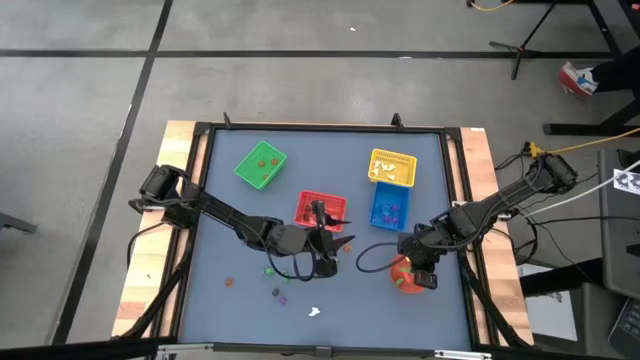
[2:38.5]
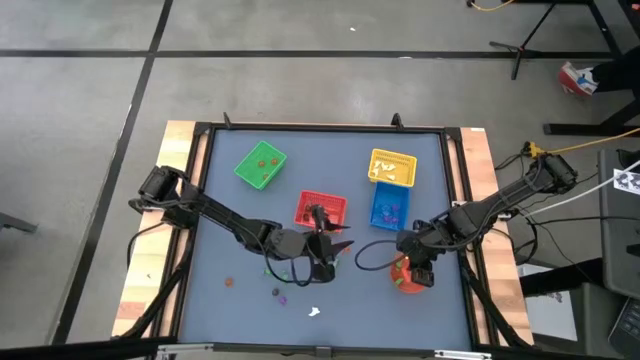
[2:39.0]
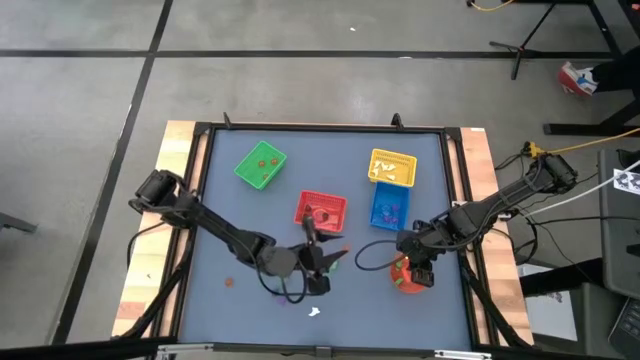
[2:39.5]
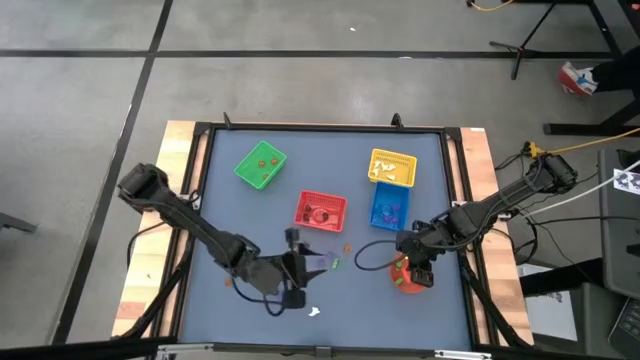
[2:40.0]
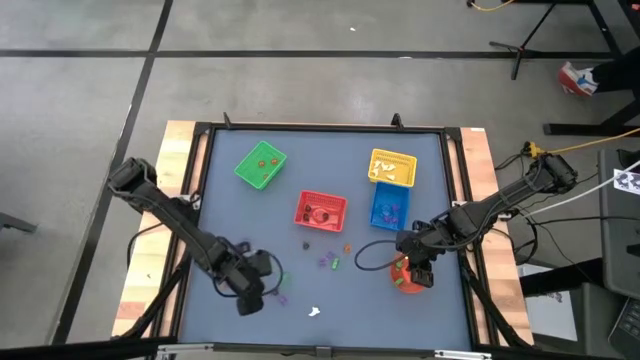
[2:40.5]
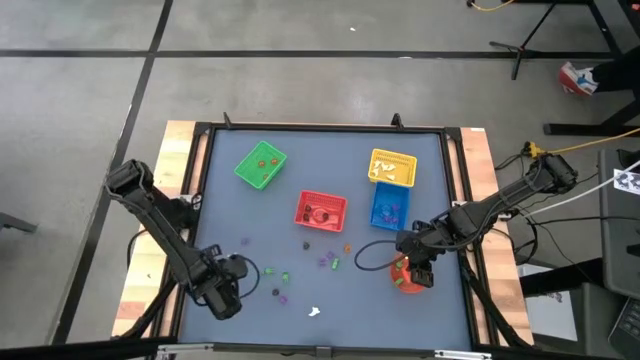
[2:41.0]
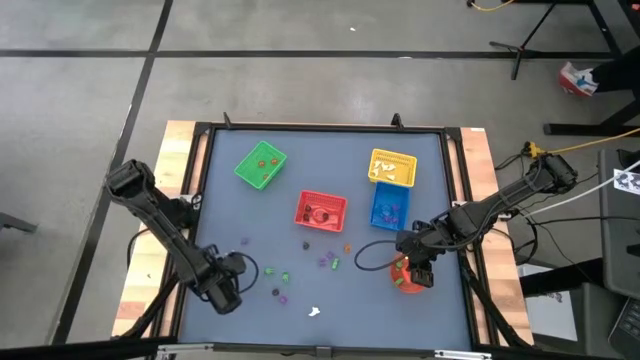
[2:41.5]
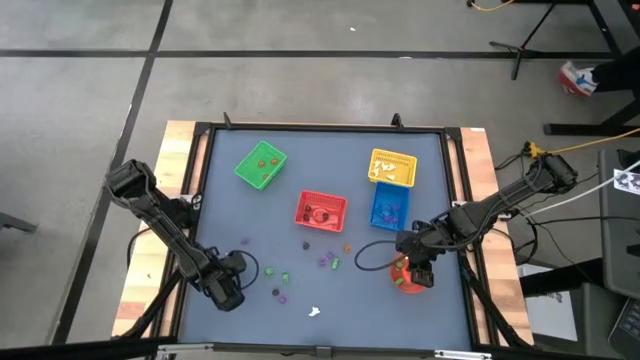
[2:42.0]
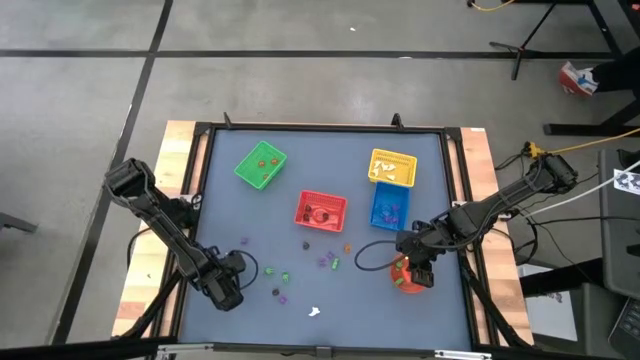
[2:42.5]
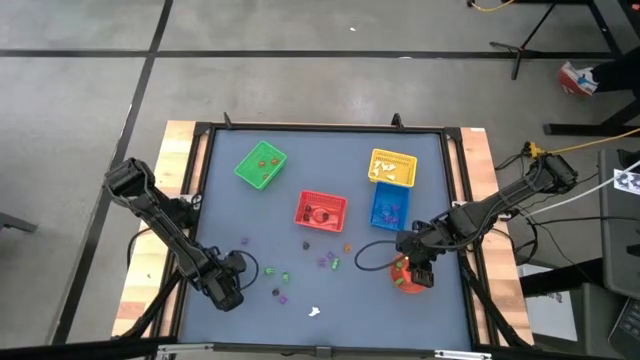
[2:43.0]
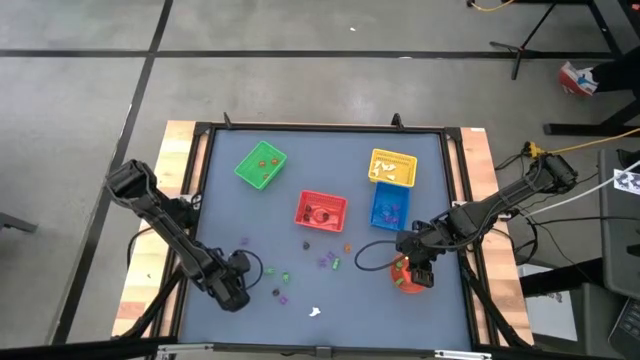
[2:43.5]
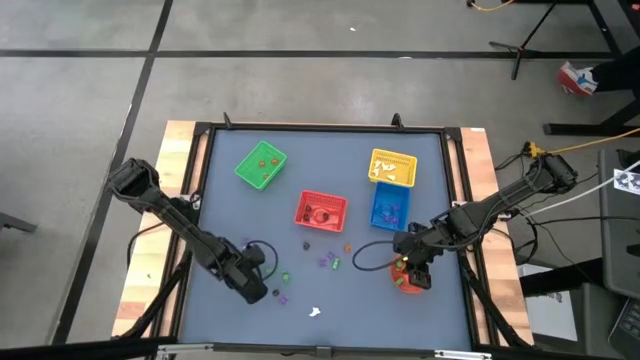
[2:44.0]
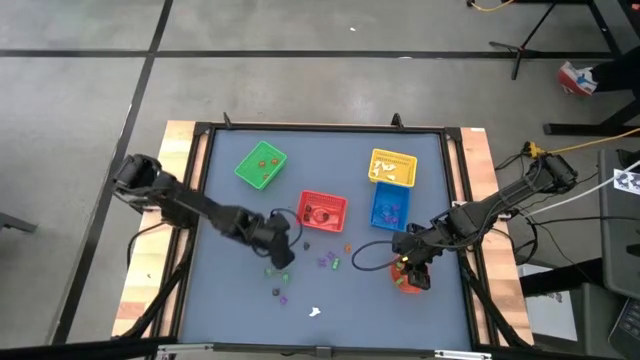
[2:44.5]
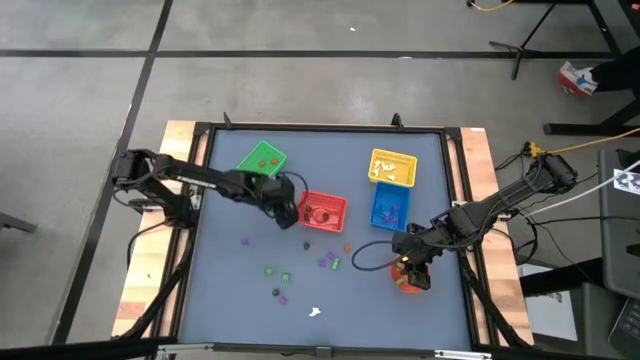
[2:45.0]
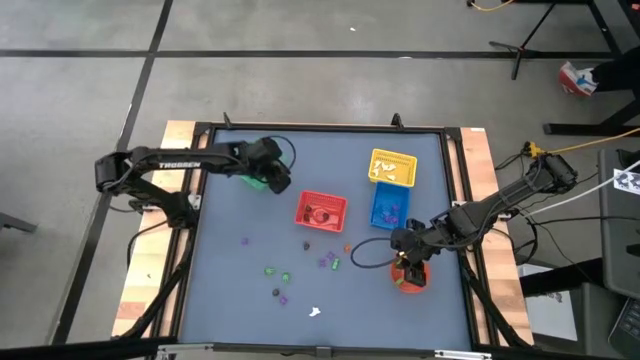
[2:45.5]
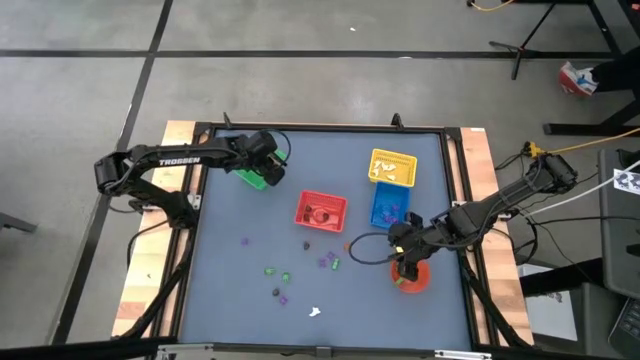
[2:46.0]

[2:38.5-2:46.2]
Task: Sort Halloween decoration
Put the orange pumpkin toy into the green bin

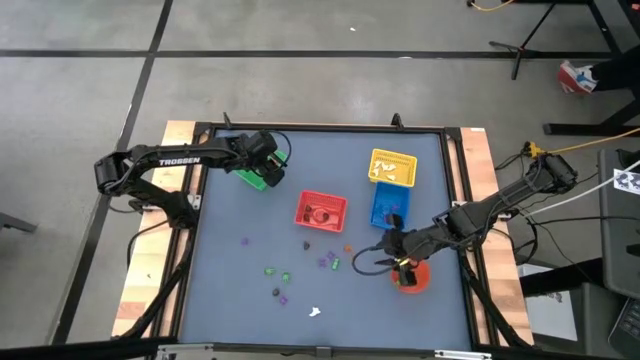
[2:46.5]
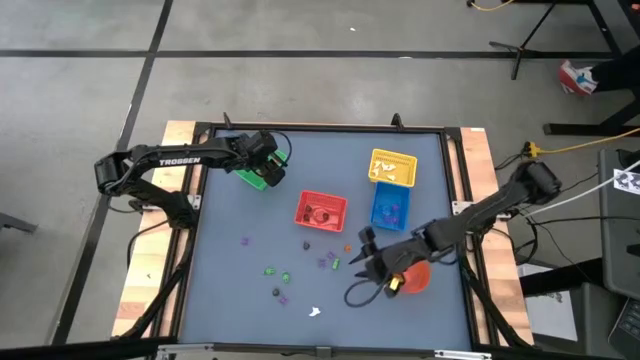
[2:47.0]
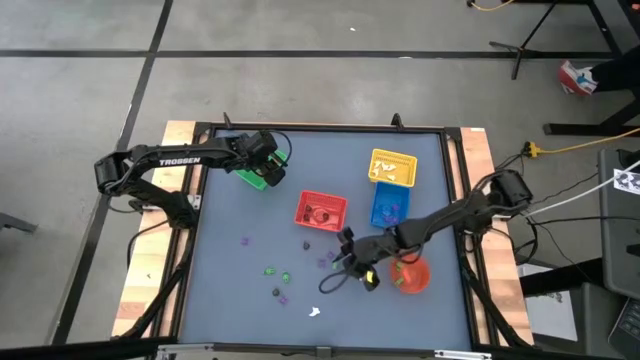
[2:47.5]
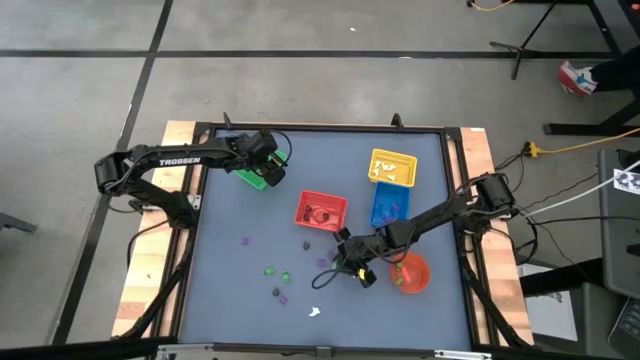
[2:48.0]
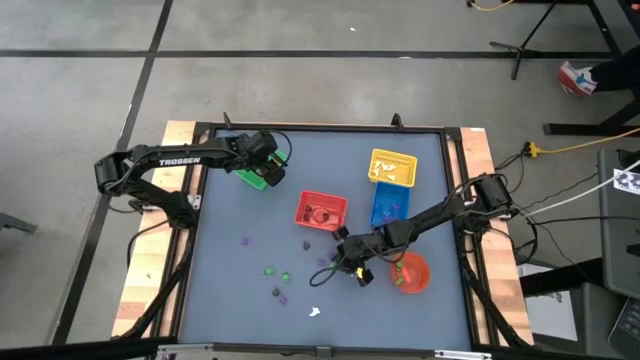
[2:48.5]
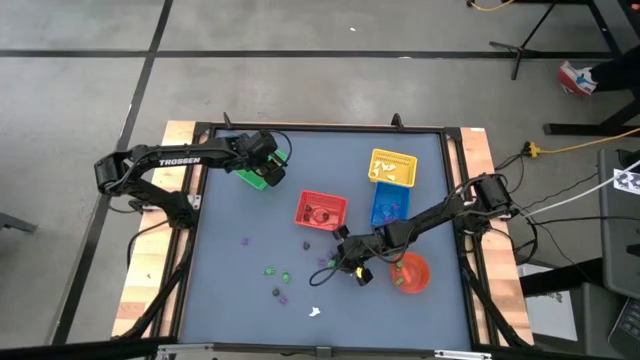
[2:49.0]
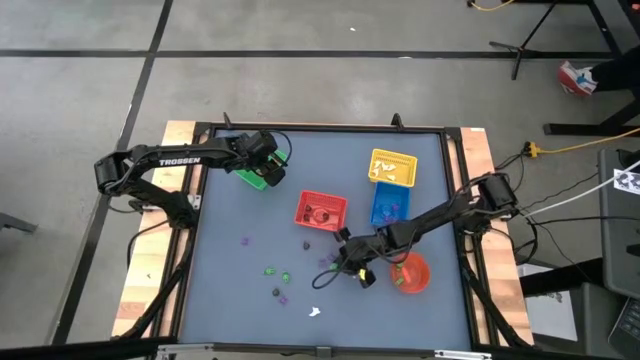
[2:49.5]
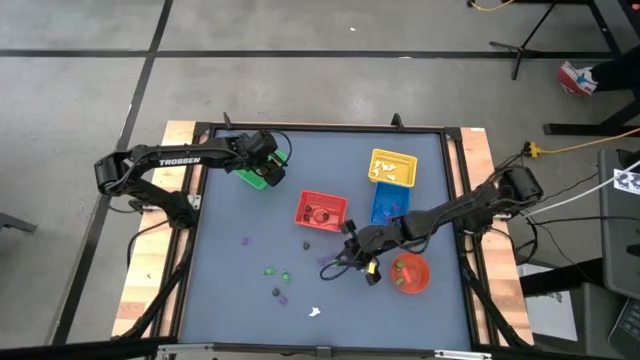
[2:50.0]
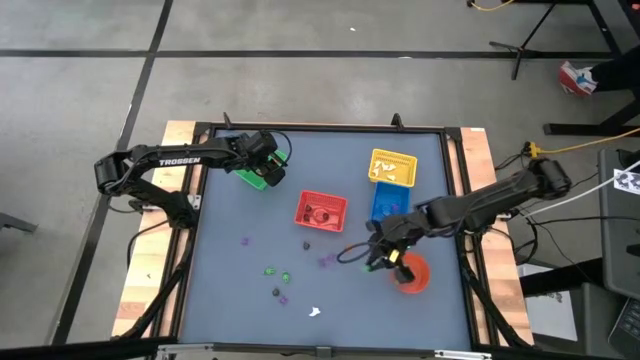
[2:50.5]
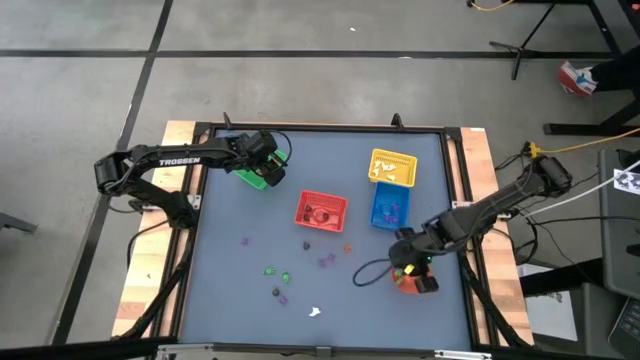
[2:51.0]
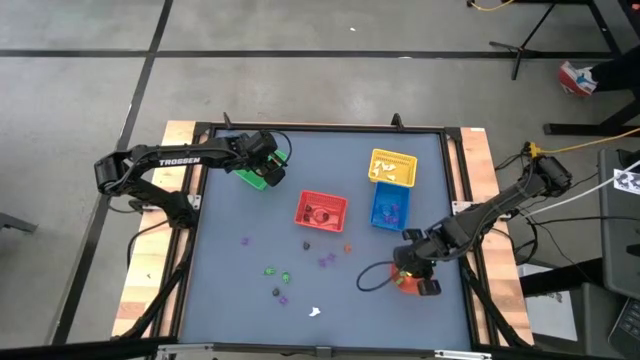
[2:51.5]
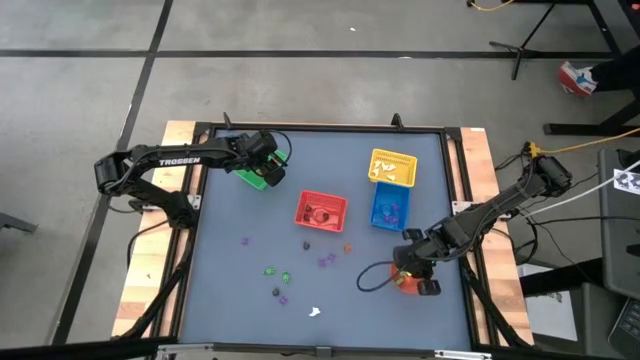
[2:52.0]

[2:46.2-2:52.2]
Put the green skeleton toy into the orange bin

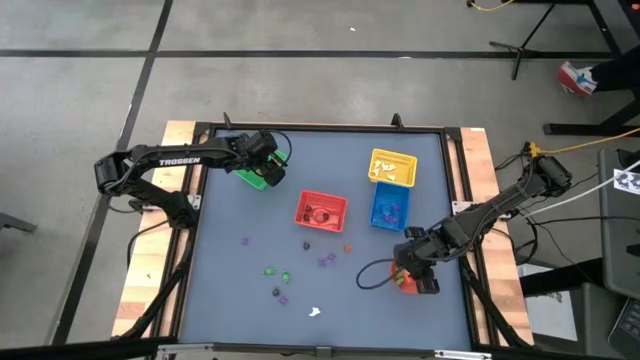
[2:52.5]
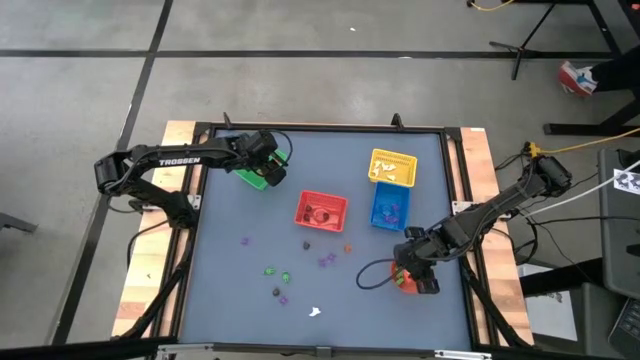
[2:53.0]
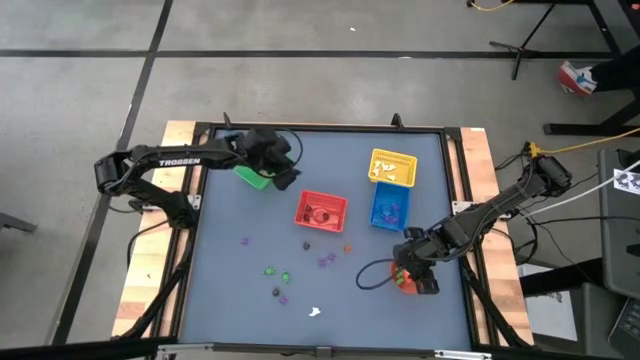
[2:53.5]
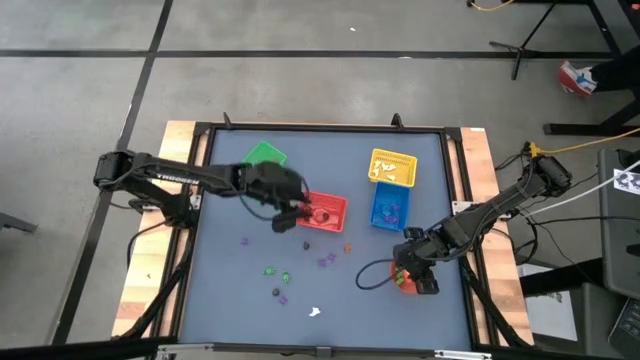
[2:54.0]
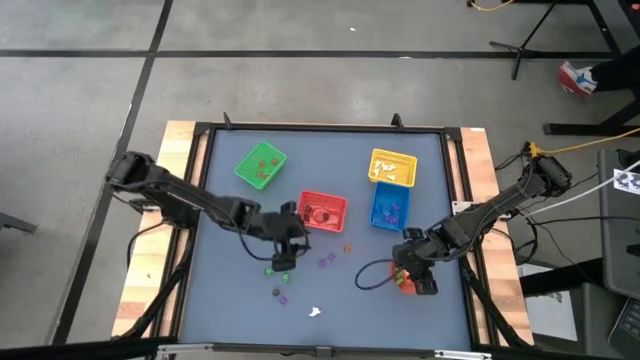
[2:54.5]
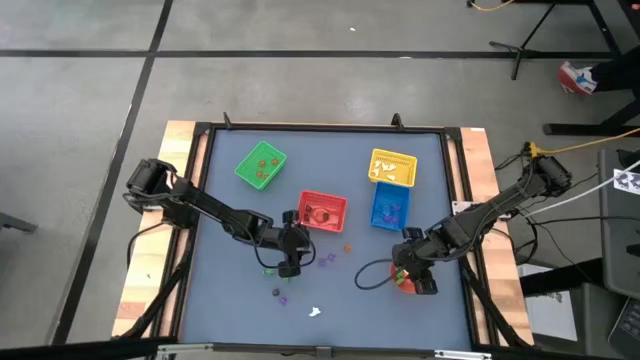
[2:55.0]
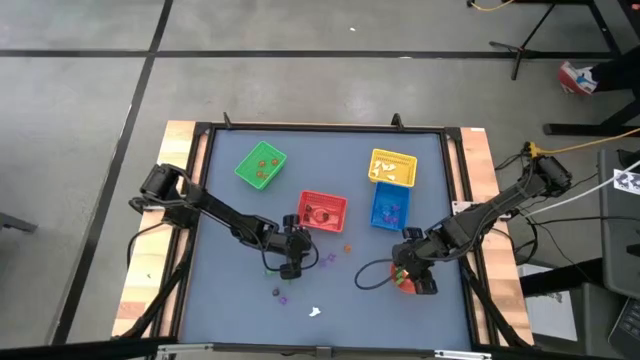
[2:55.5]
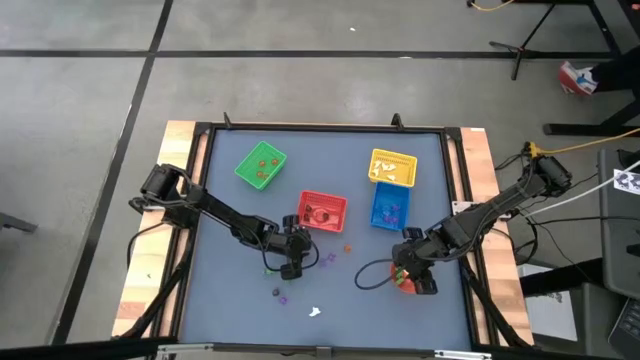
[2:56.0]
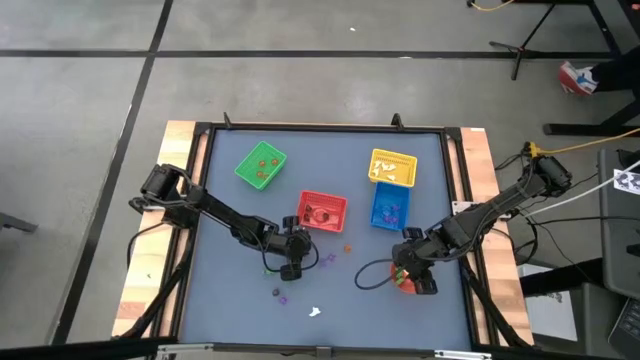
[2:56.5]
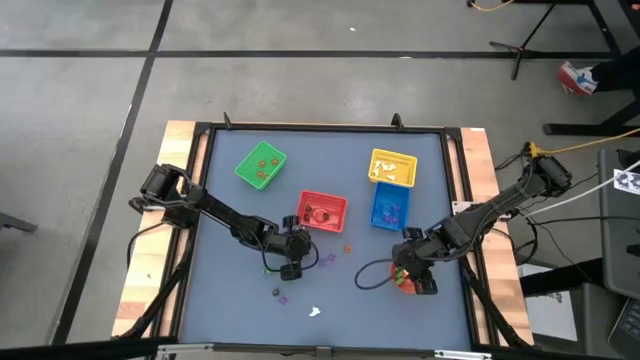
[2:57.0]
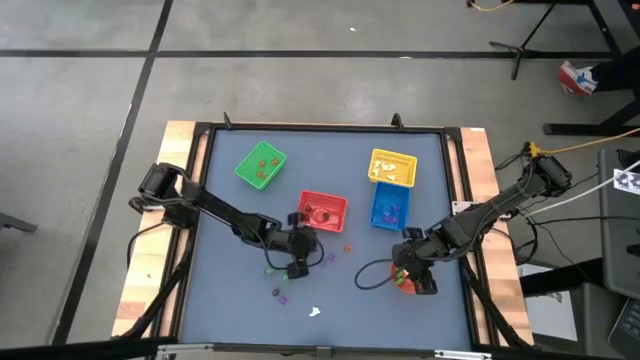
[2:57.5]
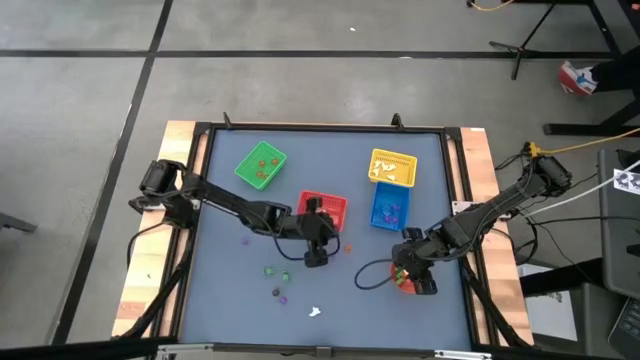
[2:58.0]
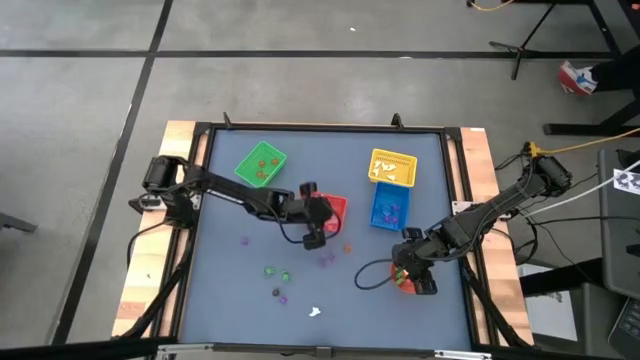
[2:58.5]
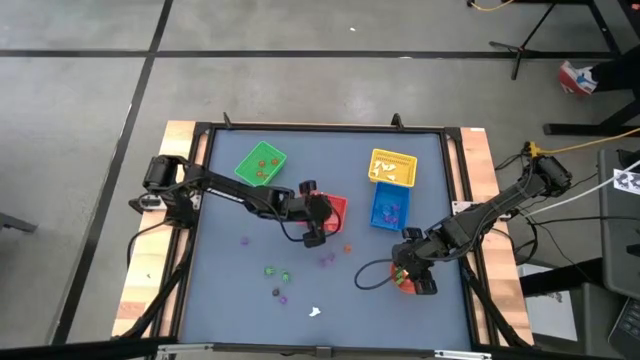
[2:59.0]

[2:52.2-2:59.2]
Put the black skull toy into the red bin

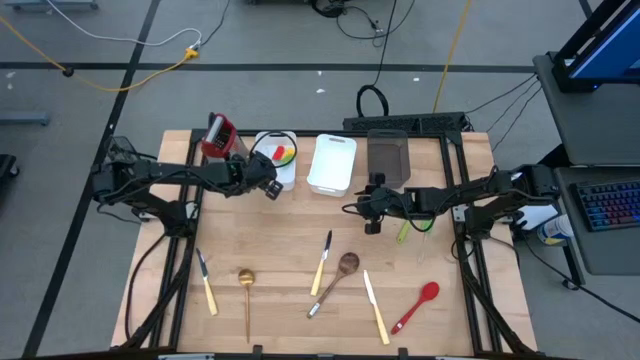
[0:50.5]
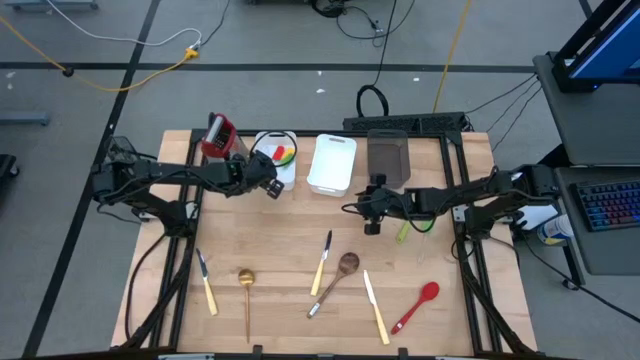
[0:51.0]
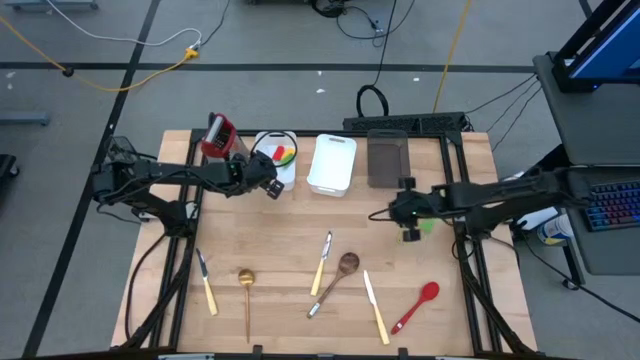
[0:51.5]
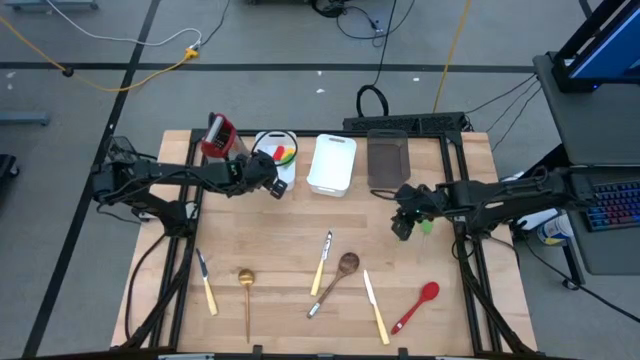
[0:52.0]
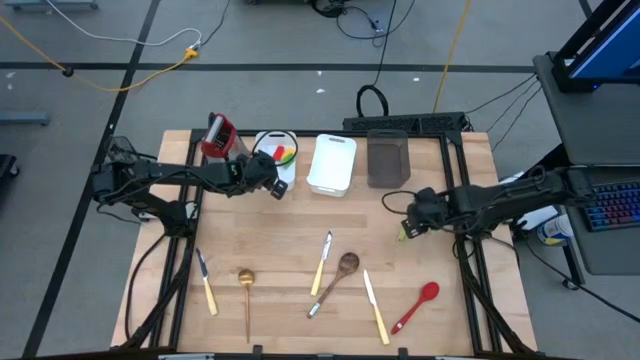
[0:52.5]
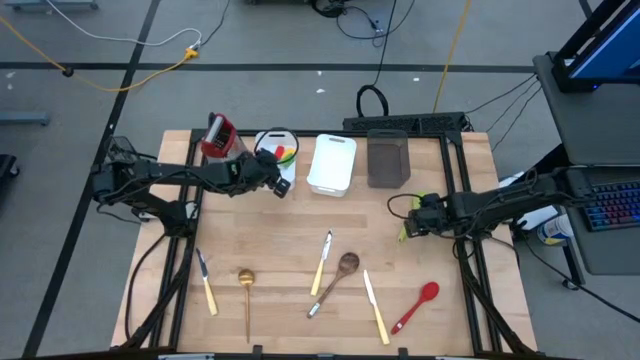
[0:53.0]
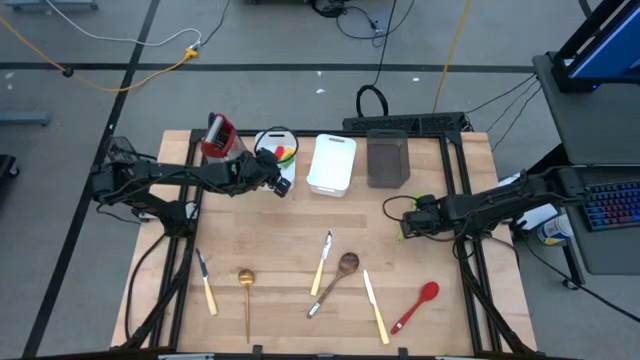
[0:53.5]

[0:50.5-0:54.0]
Task: Pick & Place Kitchen Items
Put the green spatula into the left white bin
